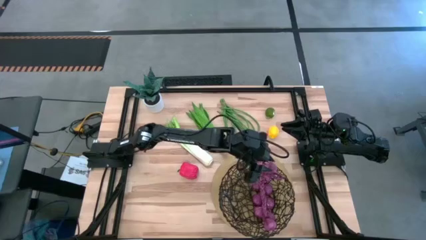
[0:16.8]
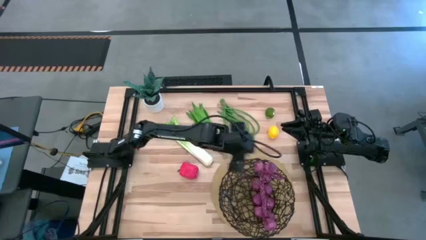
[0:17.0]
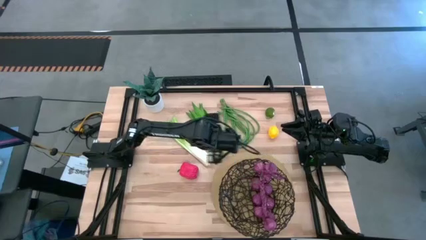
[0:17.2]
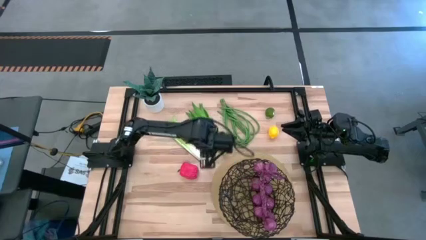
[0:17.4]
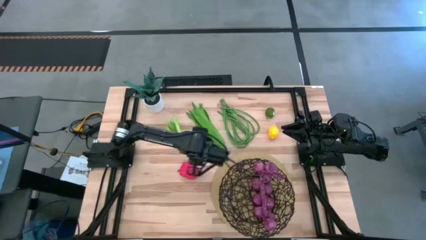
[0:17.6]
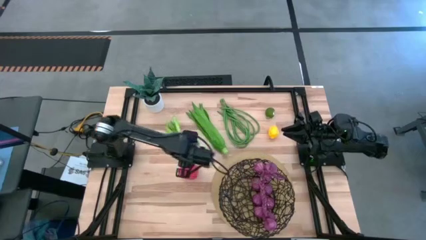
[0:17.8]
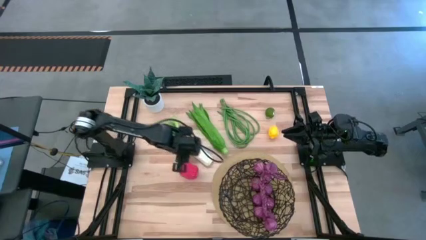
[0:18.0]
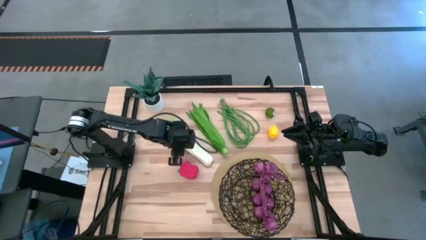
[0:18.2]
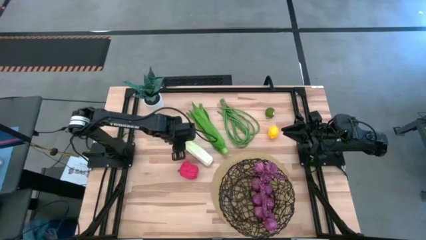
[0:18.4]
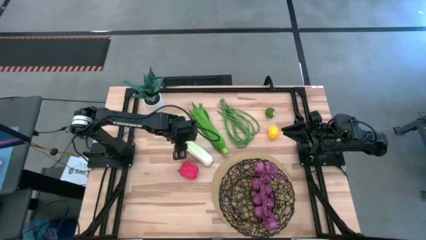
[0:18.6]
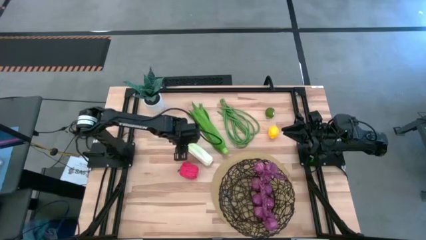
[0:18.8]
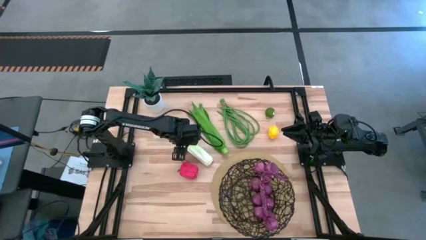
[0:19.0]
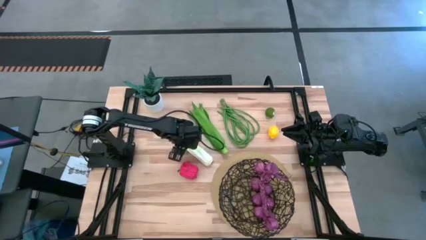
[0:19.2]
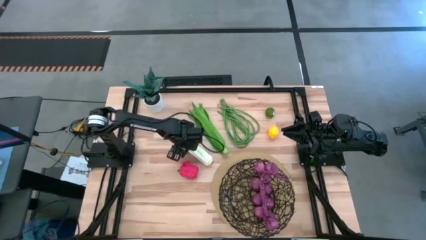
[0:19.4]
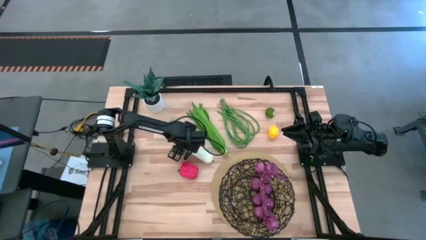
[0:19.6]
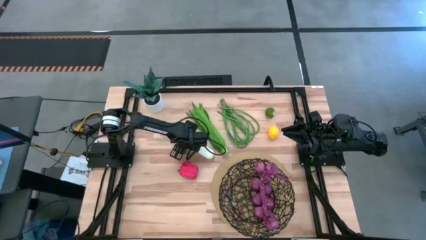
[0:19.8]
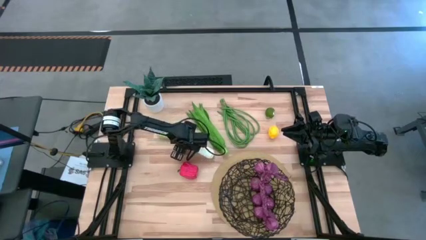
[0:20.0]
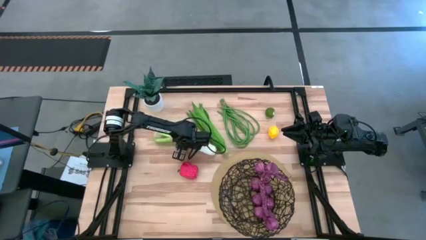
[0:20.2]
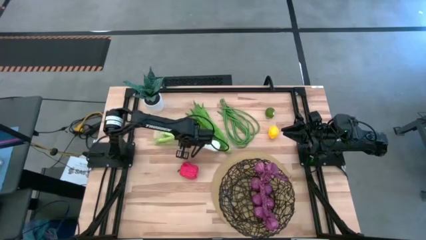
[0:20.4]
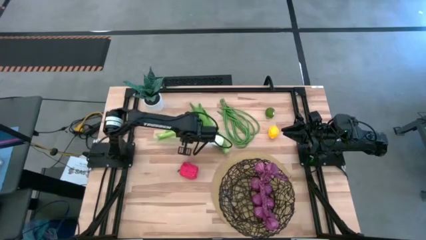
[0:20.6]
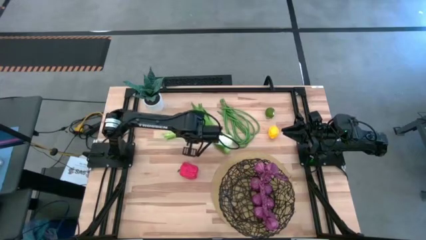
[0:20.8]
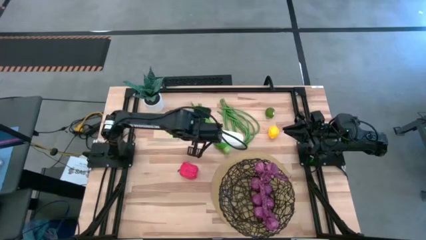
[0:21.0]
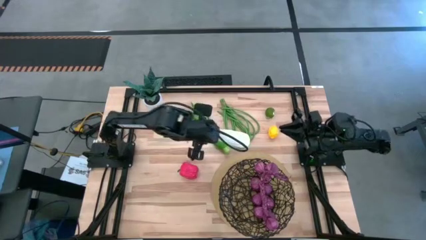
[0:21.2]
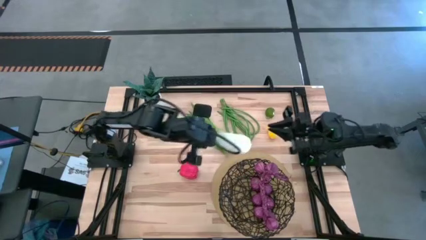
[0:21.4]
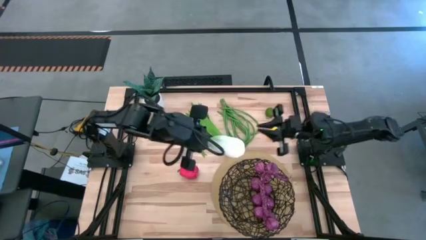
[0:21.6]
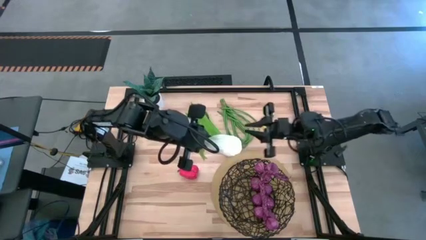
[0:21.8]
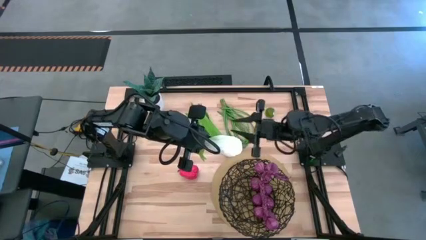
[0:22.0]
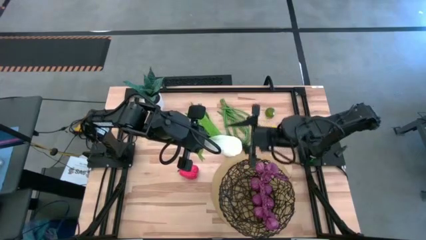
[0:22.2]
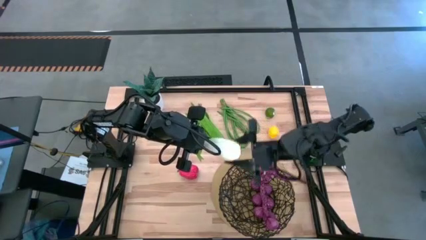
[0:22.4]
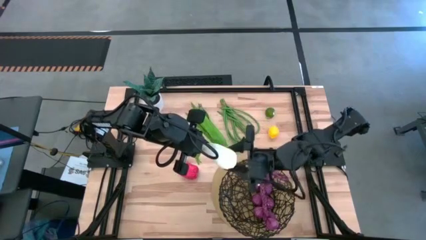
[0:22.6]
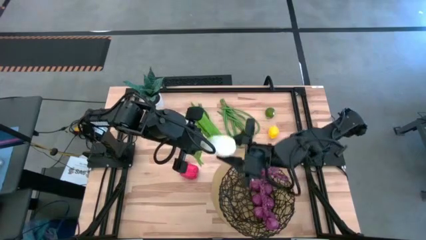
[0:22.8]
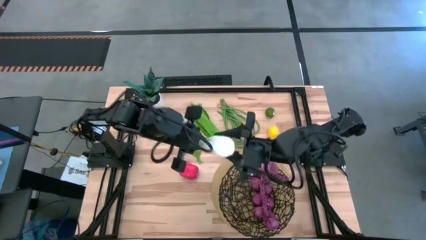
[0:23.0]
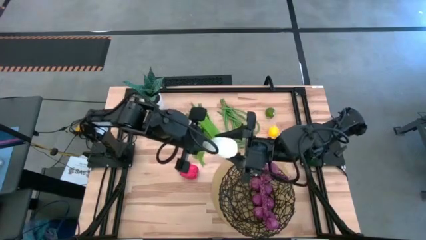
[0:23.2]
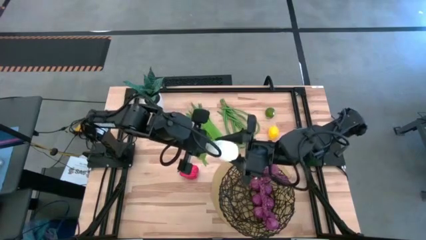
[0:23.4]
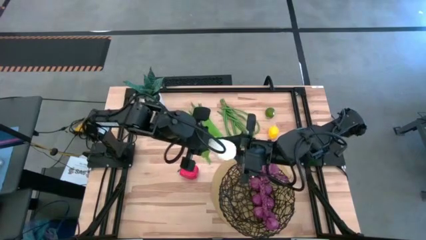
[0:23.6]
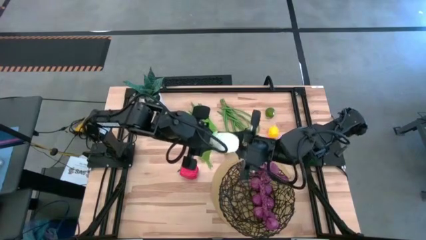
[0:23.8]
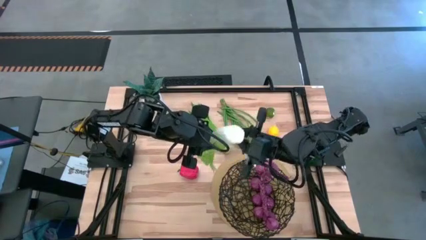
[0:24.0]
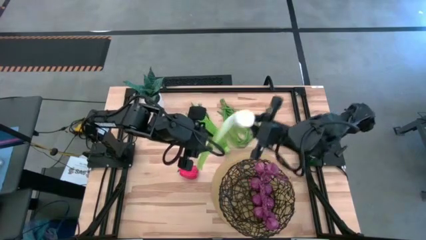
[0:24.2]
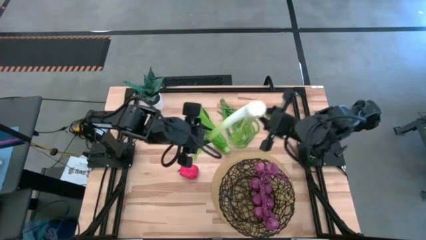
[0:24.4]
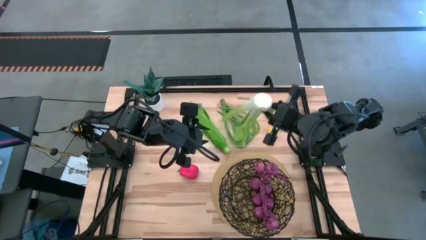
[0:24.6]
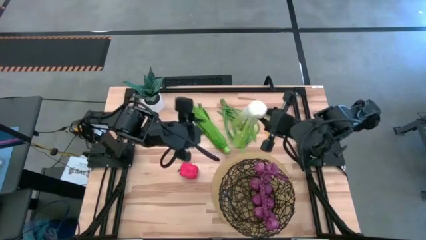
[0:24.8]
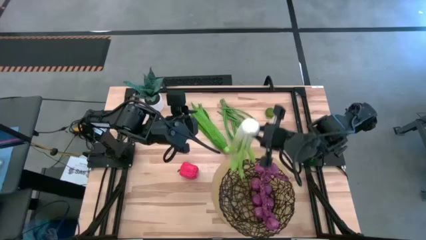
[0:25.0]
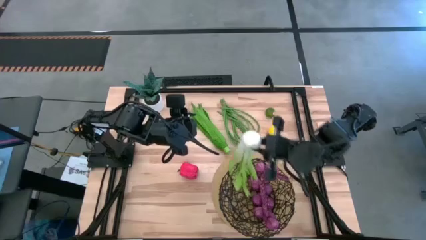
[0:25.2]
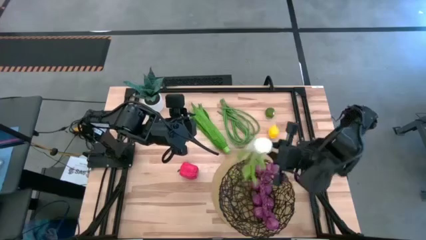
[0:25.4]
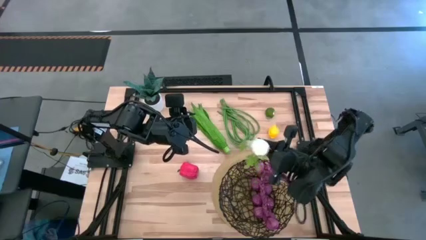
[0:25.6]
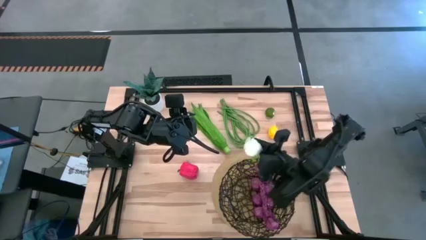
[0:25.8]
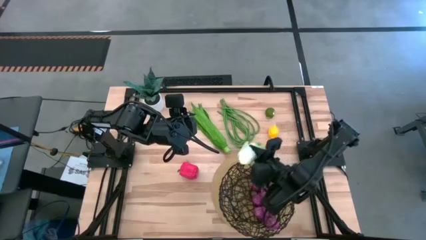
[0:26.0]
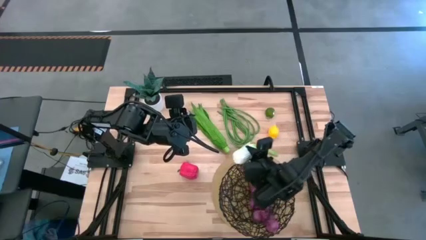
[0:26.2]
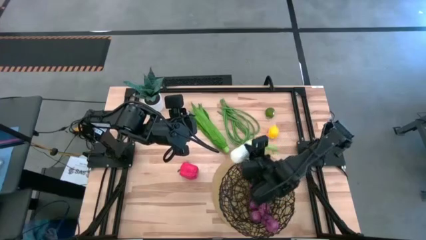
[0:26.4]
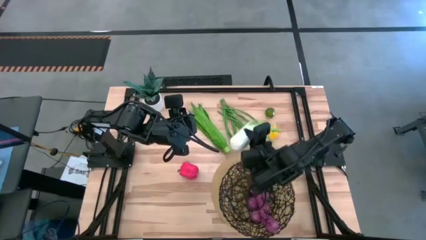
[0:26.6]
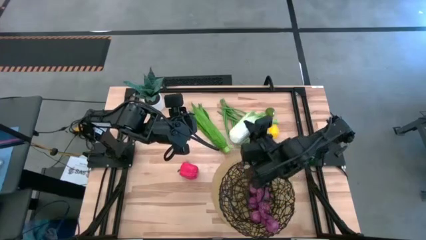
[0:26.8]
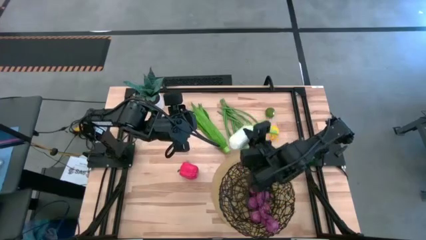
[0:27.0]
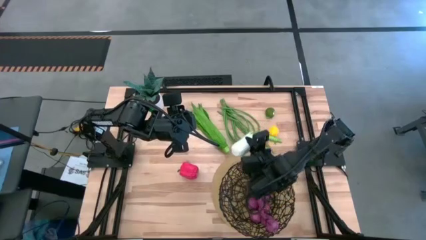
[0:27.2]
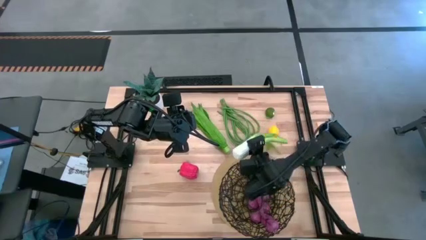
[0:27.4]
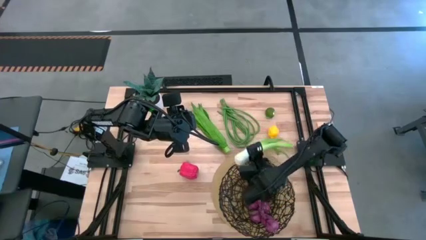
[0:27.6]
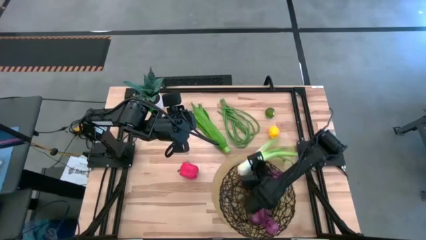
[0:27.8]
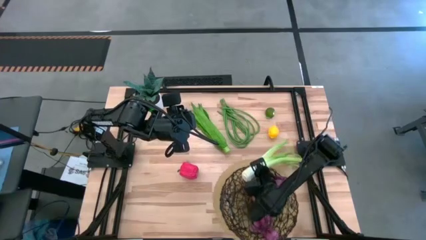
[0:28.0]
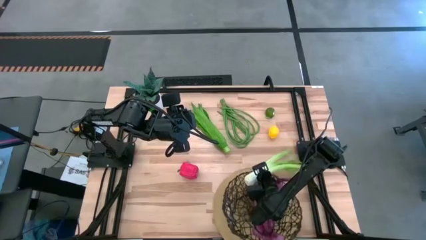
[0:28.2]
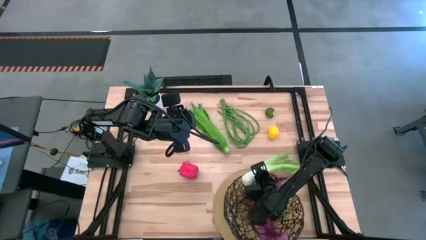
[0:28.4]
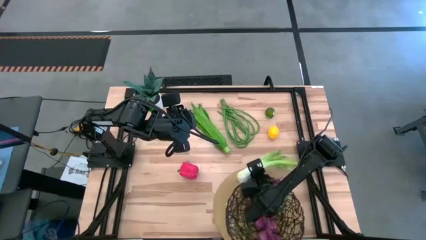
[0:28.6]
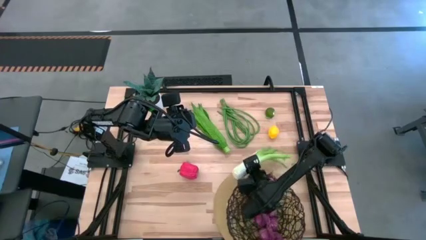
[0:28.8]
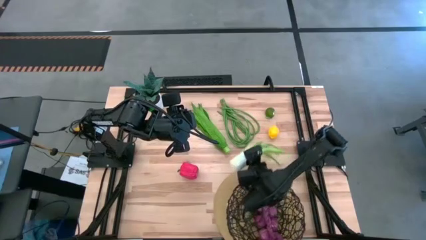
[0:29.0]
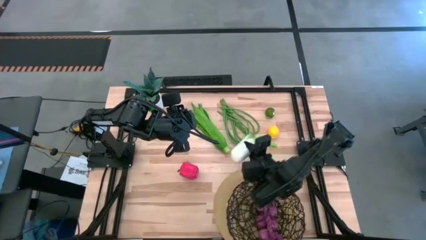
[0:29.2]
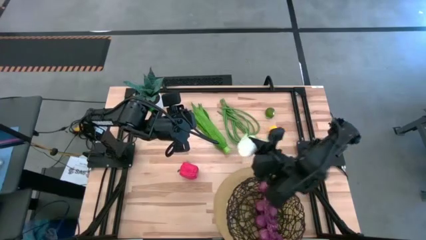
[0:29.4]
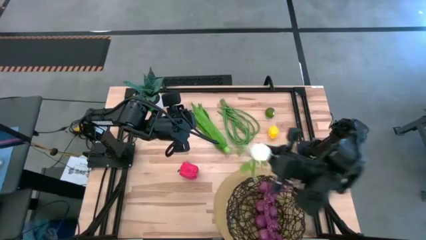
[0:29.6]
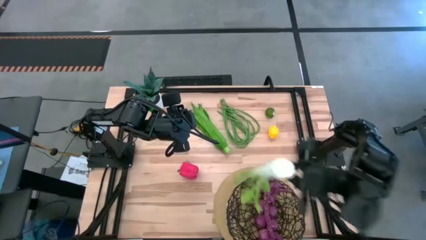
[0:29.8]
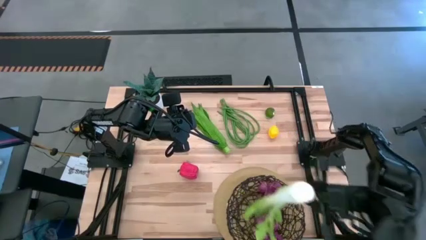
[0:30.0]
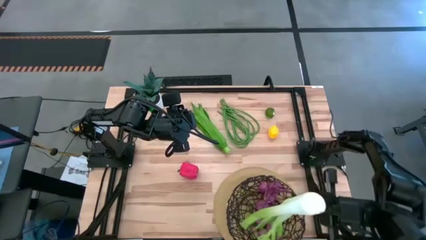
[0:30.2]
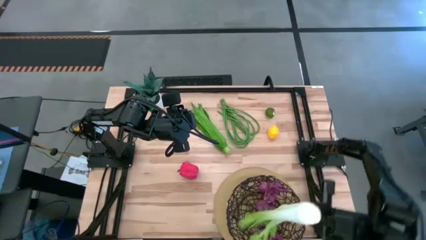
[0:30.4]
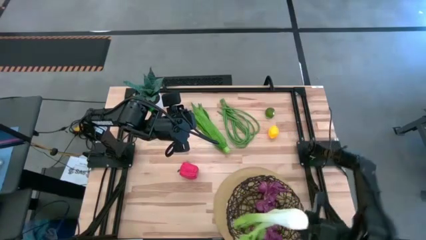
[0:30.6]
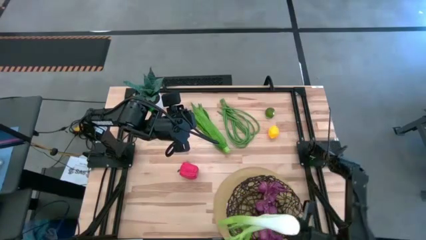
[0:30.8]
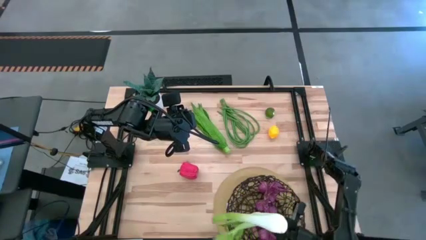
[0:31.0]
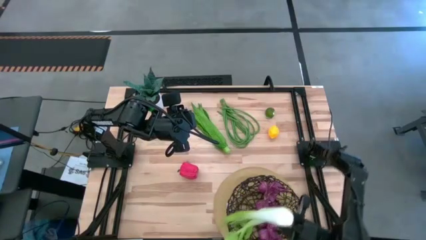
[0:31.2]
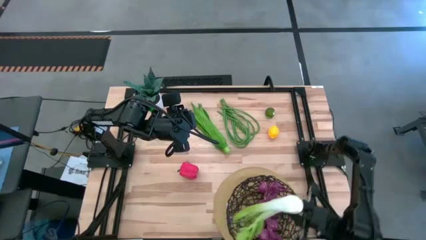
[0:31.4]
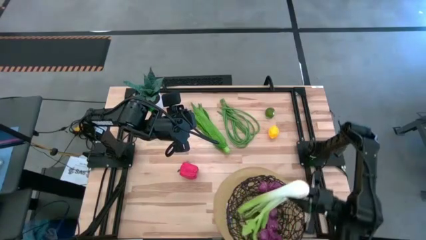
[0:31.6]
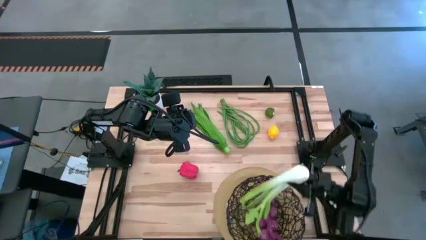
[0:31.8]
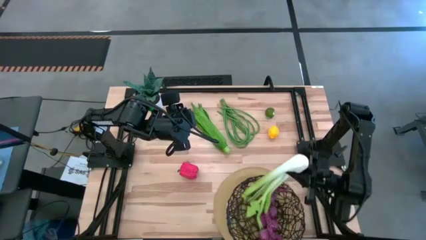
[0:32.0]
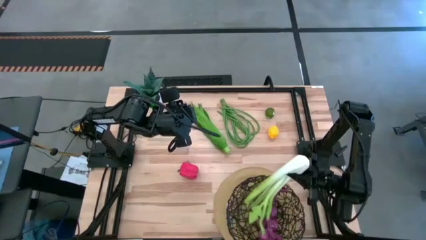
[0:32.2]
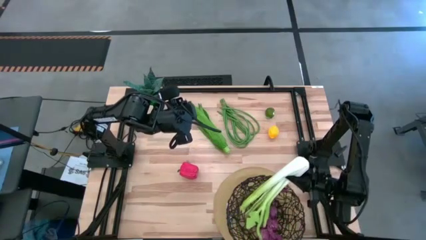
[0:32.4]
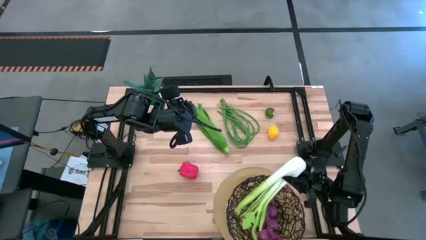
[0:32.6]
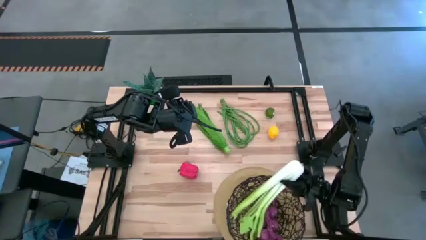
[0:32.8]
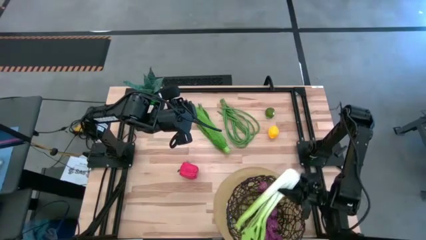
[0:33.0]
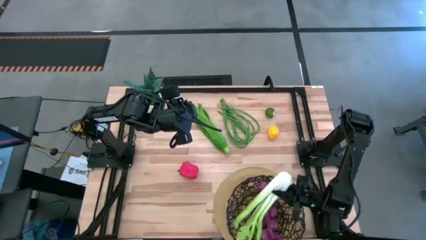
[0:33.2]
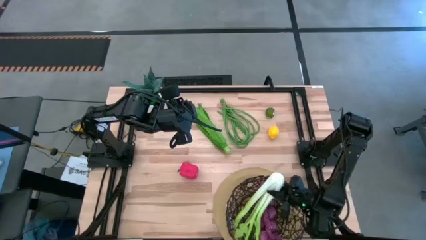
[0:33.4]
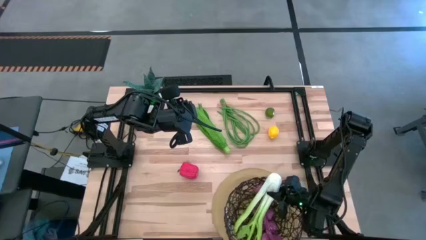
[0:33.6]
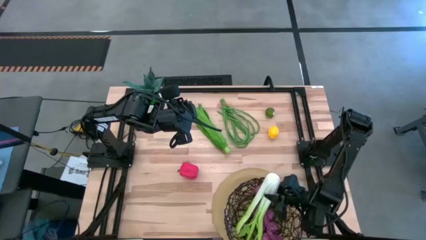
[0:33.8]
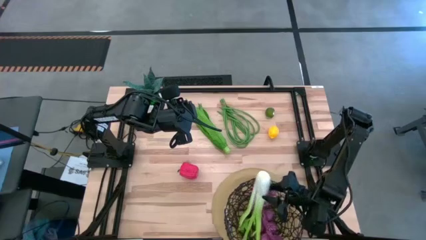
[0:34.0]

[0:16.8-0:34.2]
Task: Build produce basket
Put the green celery into the black basket
